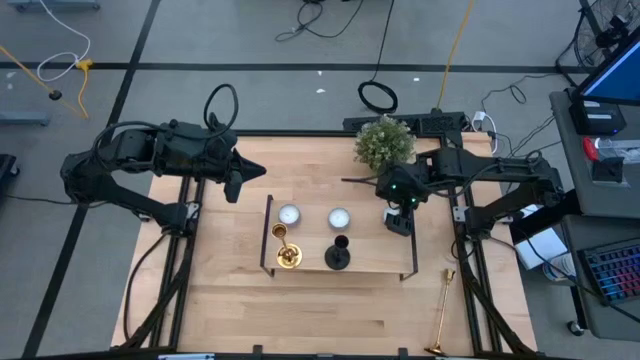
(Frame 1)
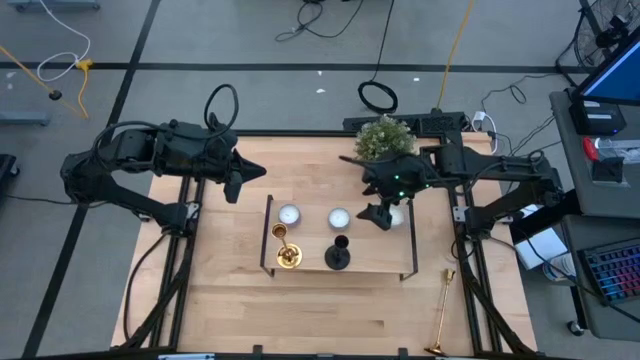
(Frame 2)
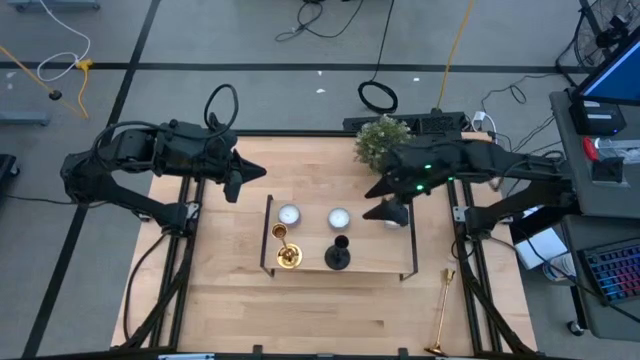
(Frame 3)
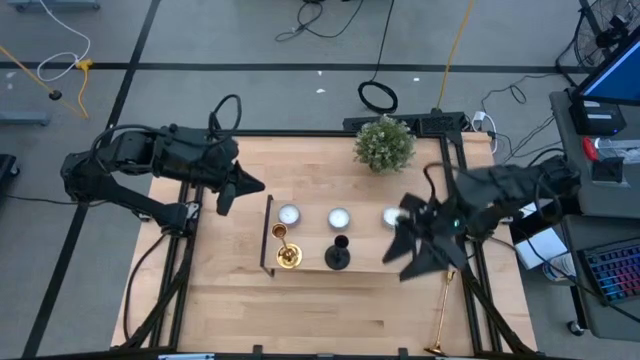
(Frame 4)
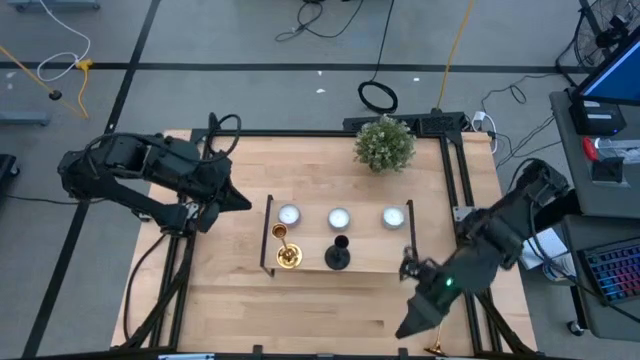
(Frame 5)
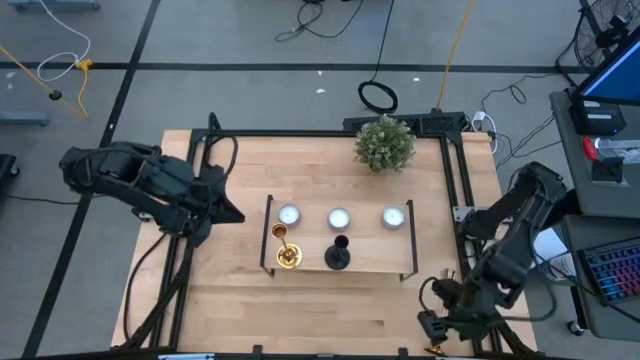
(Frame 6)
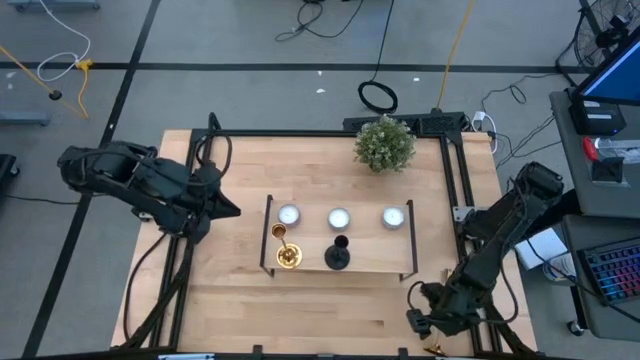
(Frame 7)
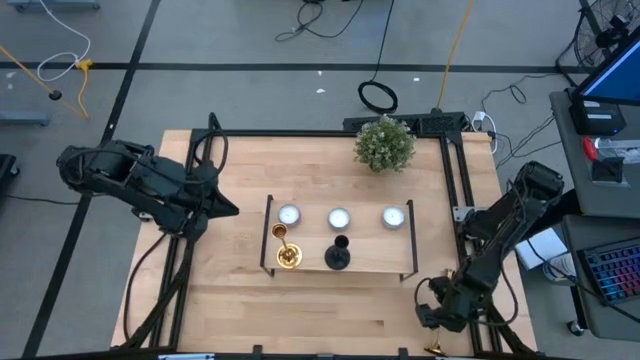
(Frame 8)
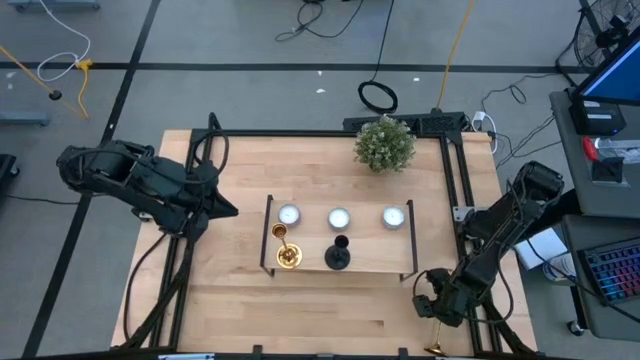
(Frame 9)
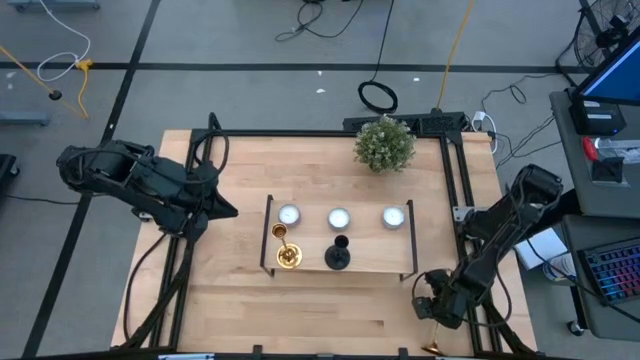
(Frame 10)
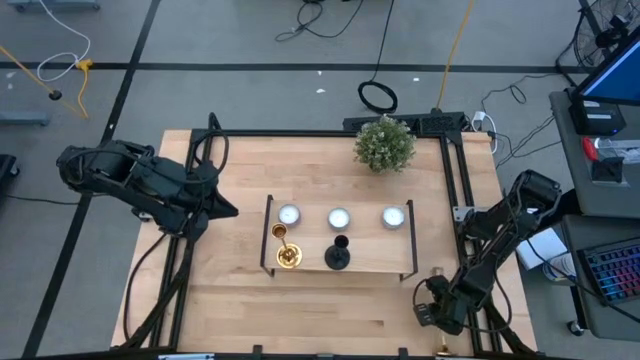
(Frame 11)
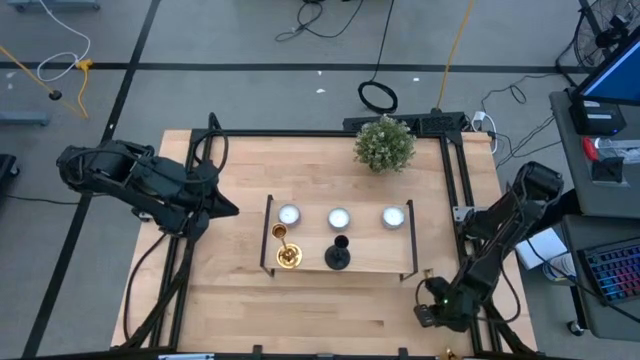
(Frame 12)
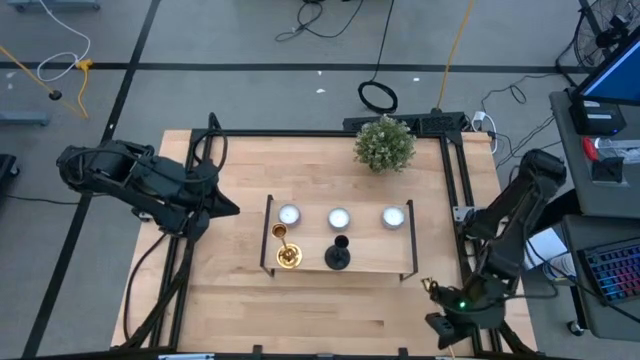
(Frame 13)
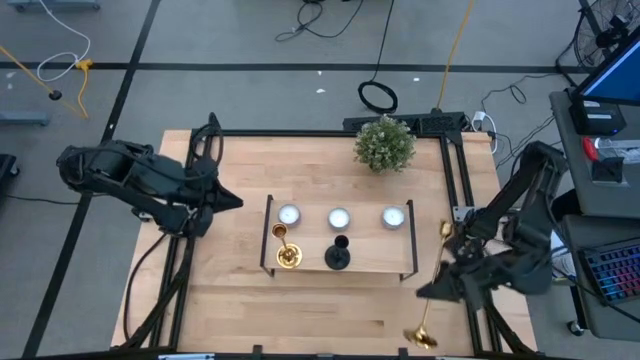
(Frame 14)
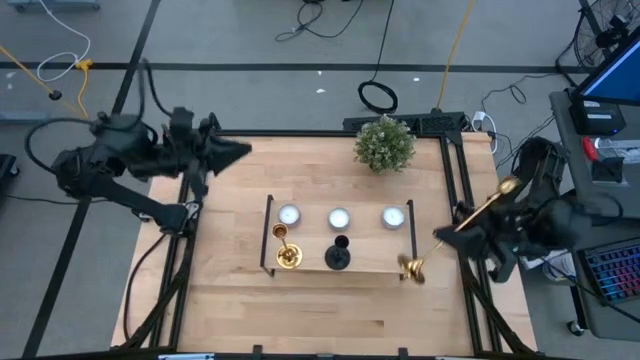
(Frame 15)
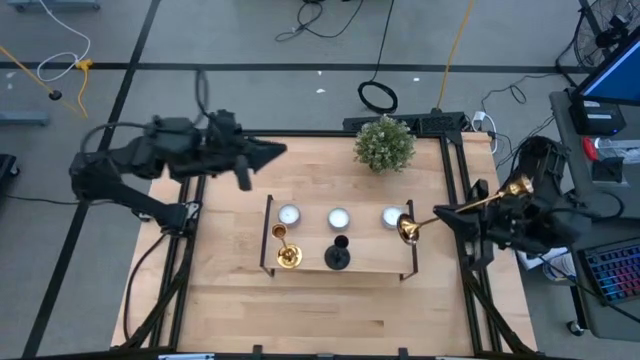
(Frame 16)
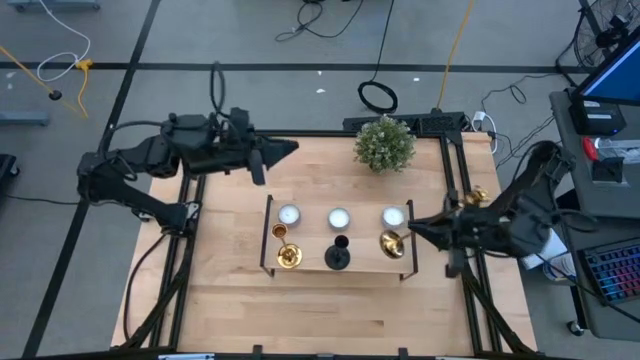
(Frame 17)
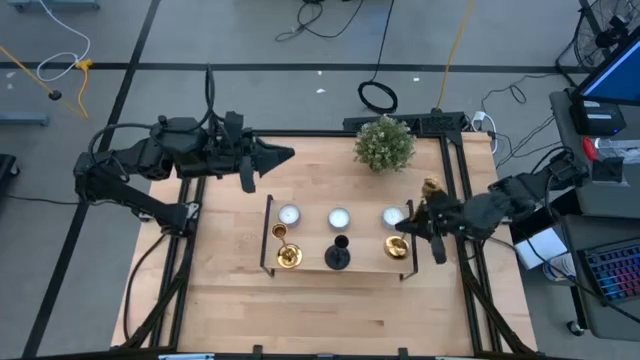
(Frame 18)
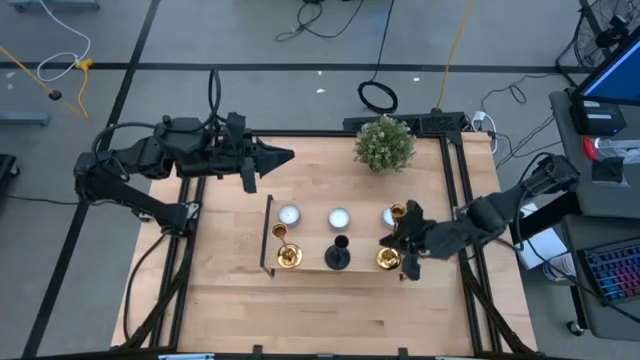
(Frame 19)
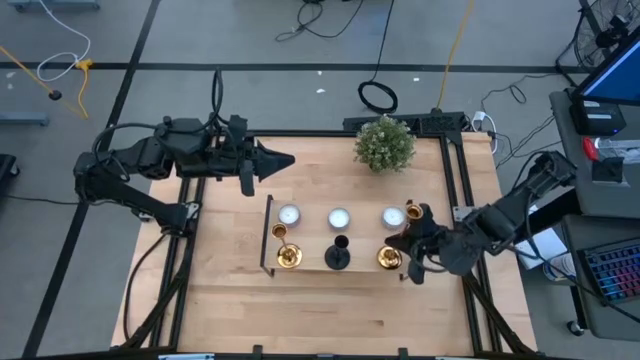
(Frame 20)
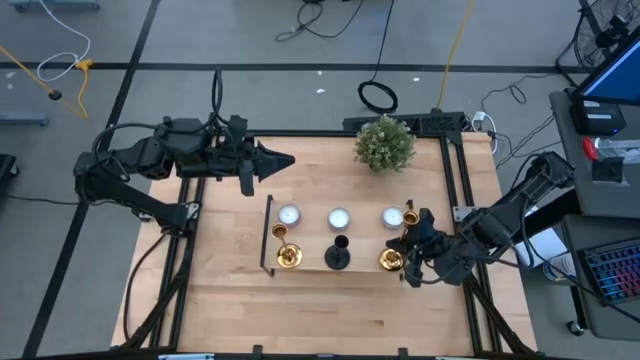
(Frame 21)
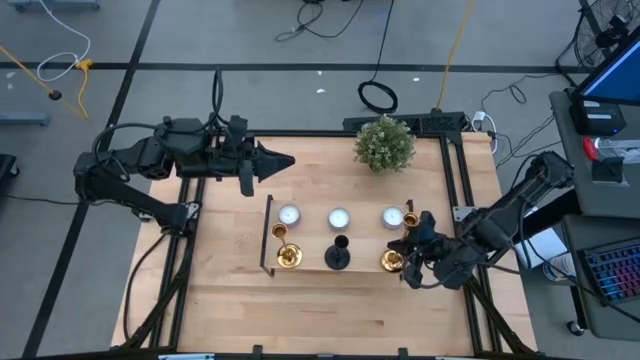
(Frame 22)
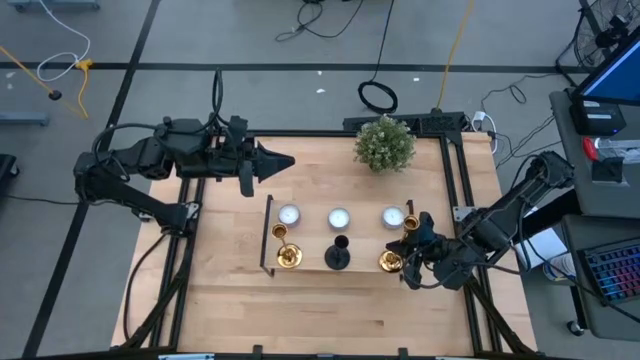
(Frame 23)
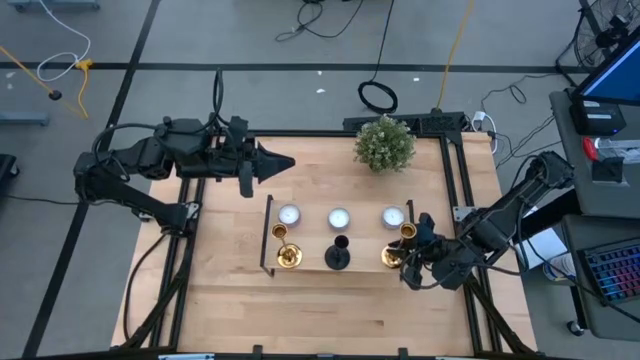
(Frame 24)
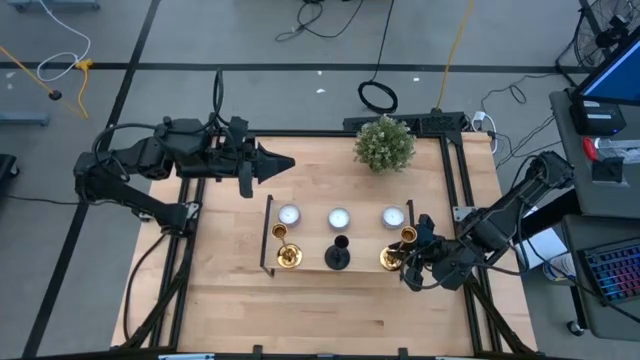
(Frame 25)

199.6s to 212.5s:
Task: Pick & Place candle stick holders
Put the golden candle holder onto shelf

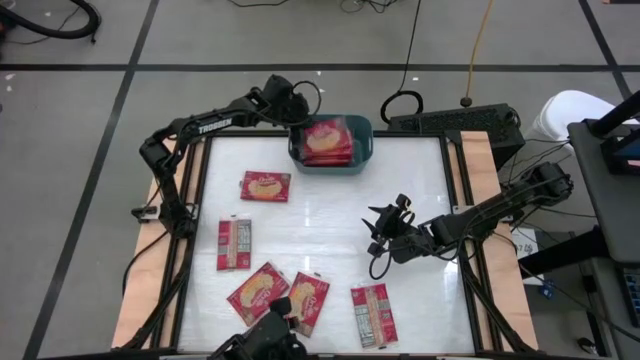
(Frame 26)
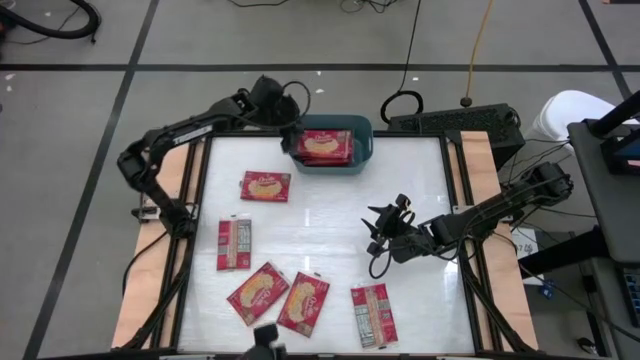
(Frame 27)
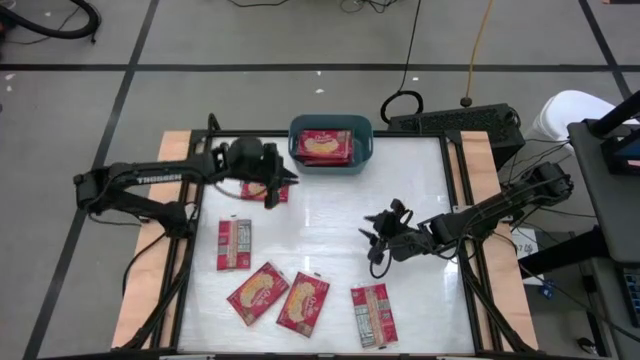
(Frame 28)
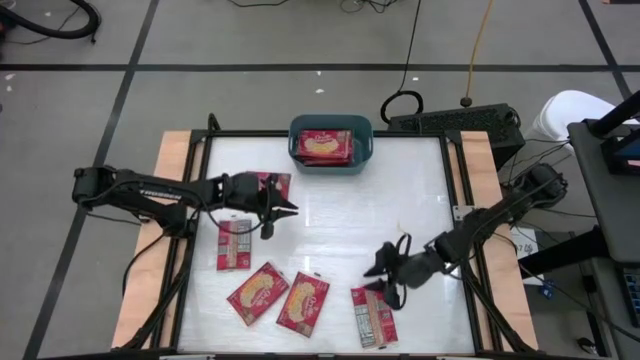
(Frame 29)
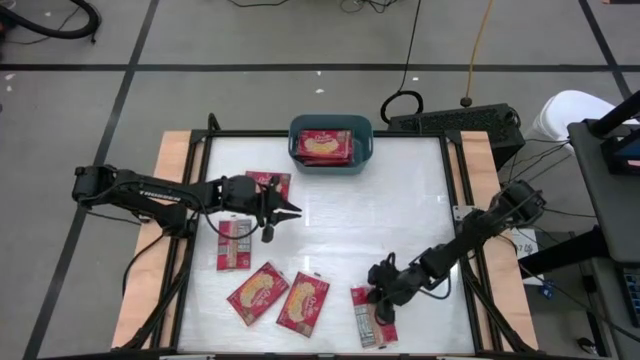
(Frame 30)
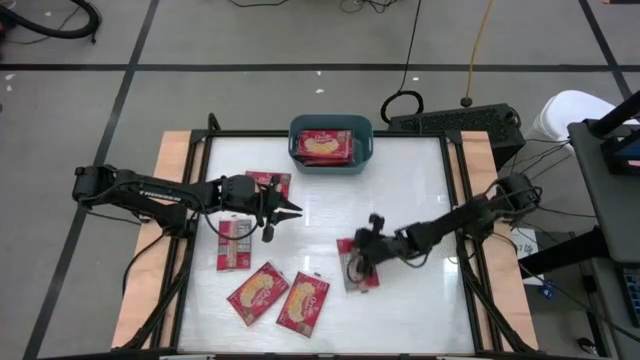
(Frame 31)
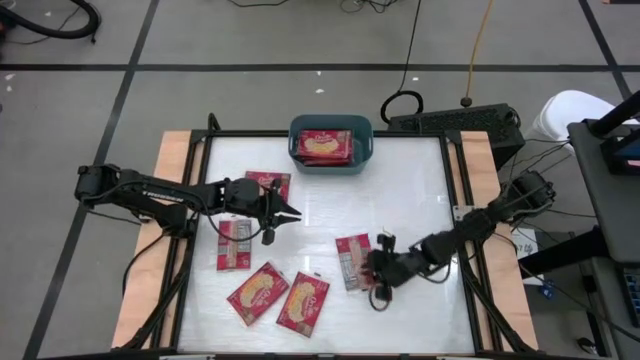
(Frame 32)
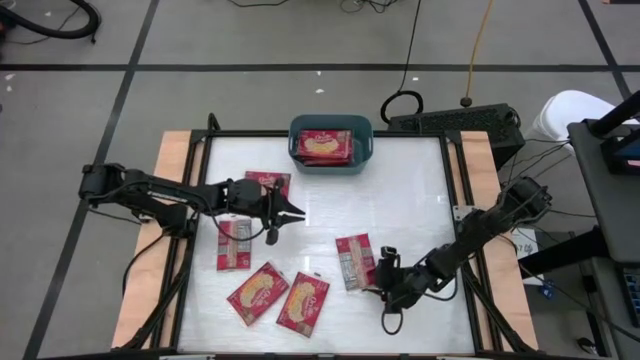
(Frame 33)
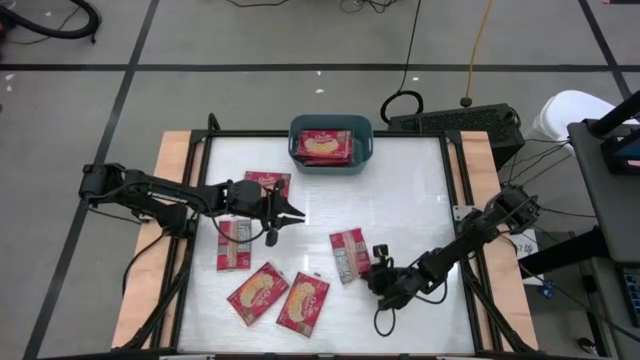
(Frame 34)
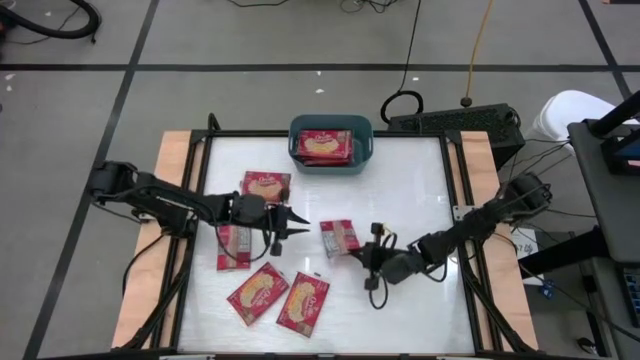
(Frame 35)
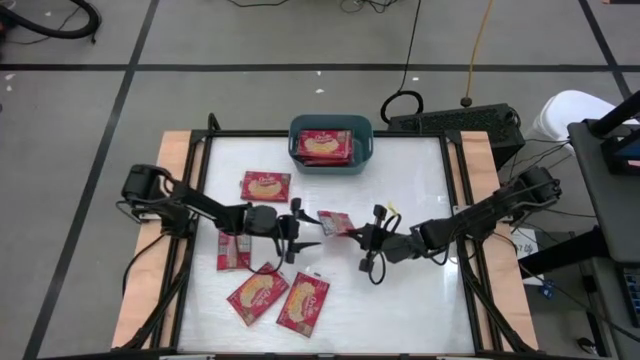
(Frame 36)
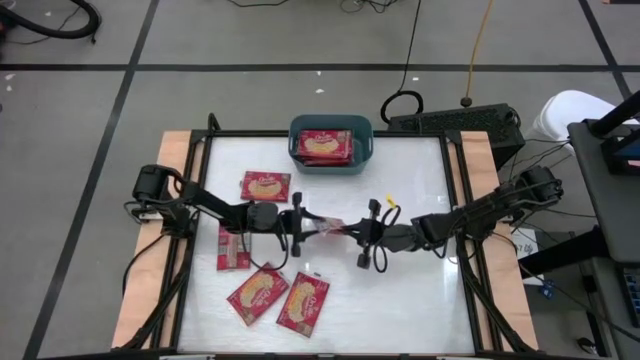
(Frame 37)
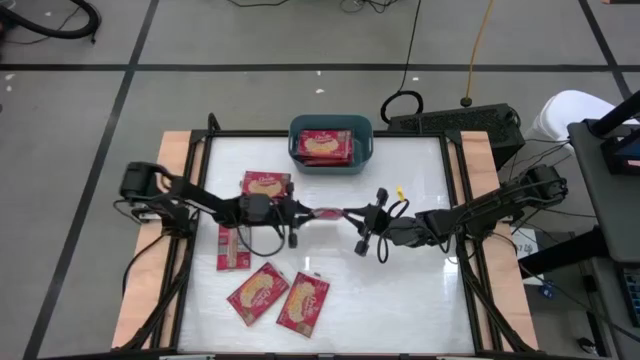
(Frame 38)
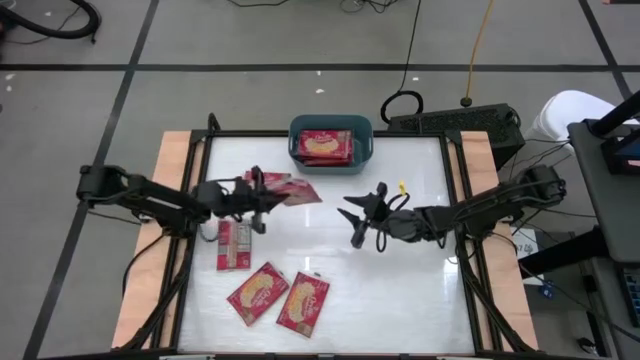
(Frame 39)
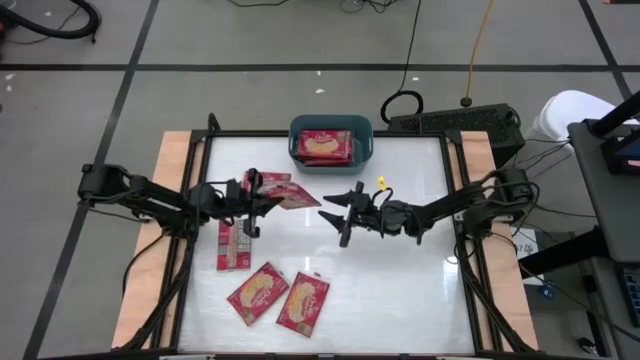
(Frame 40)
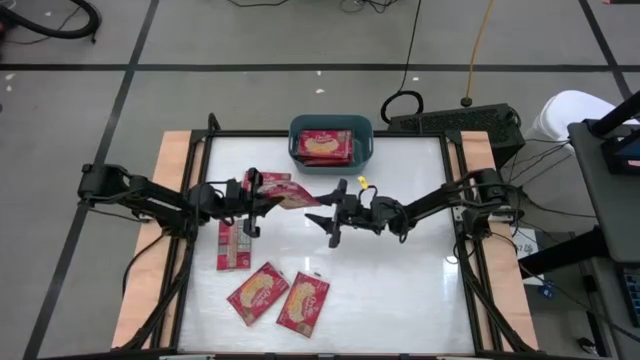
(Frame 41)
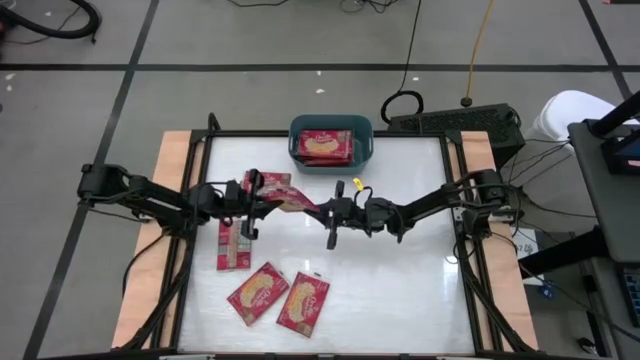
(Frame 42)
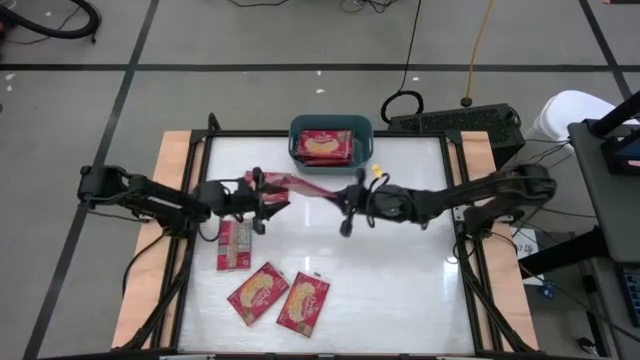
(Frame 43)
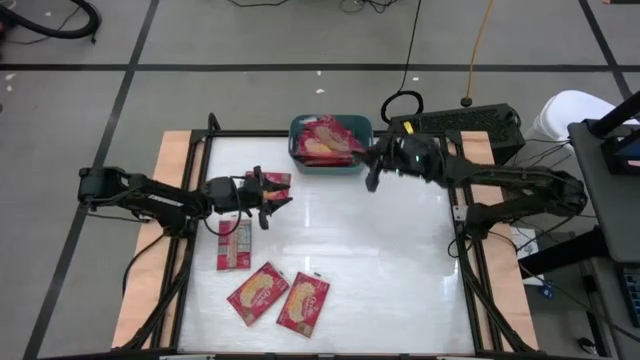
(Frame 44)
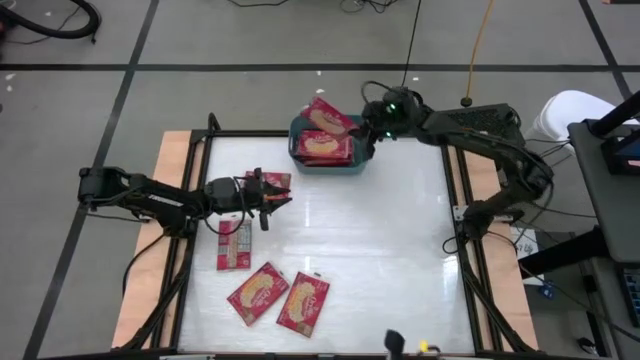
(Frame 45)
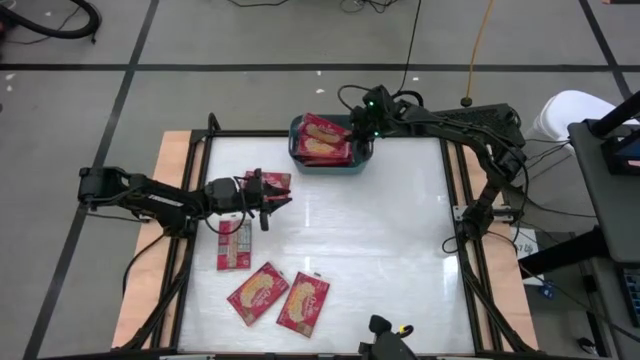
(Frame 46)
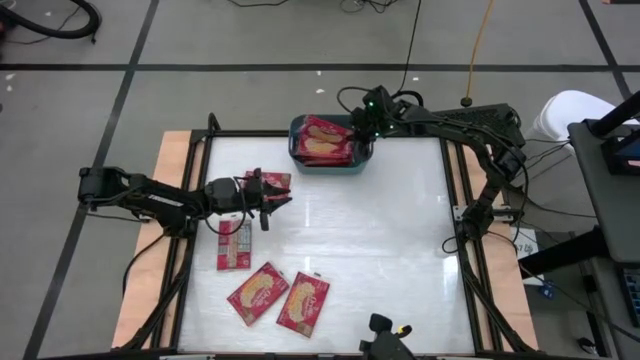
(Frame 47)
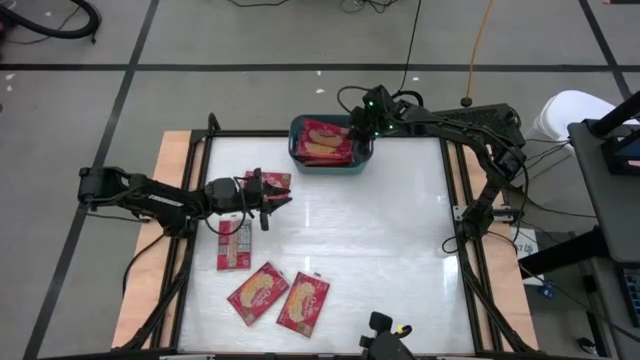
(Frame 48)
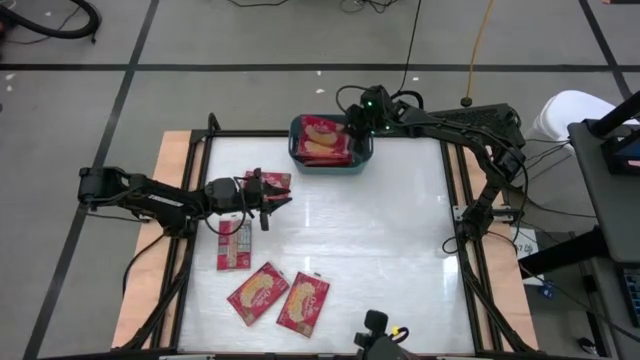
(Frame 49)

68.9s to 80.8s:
Task: Sort popcorn bags into baskets
Put the red popcorn bag into the green bin
